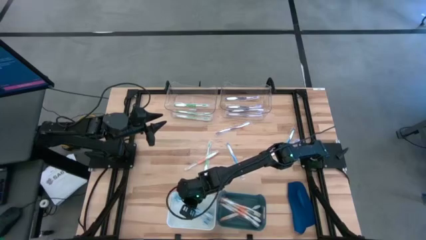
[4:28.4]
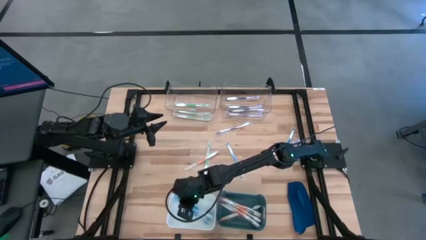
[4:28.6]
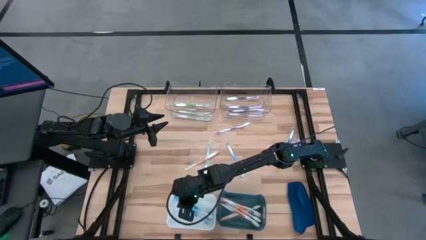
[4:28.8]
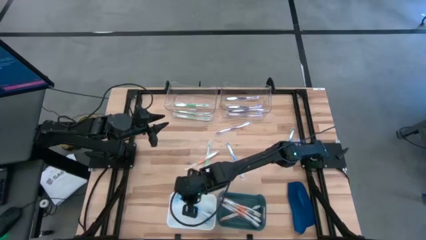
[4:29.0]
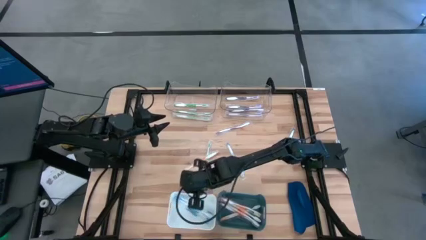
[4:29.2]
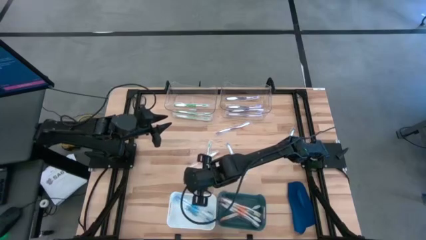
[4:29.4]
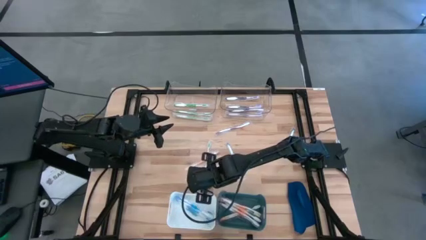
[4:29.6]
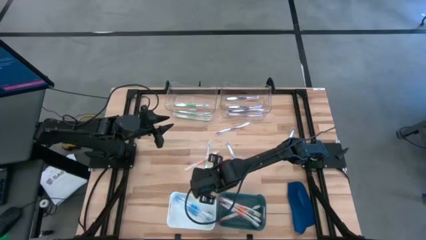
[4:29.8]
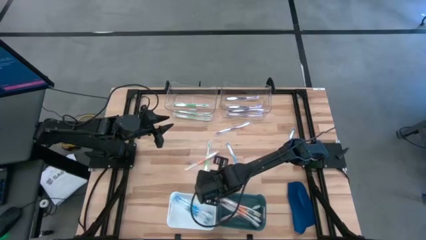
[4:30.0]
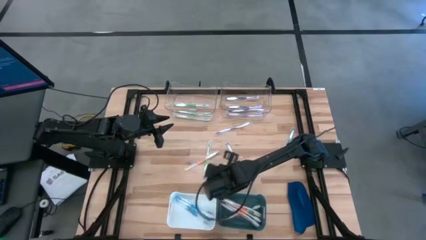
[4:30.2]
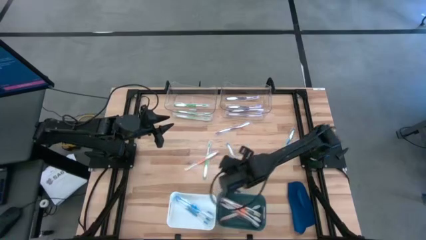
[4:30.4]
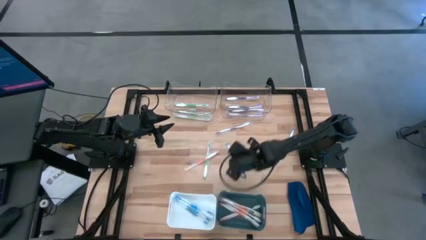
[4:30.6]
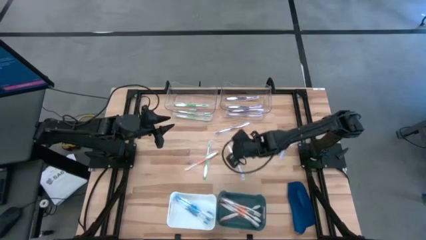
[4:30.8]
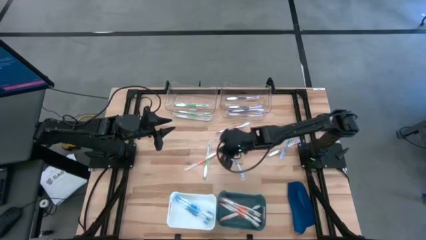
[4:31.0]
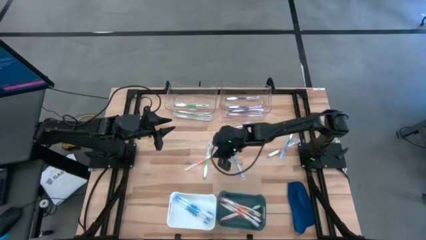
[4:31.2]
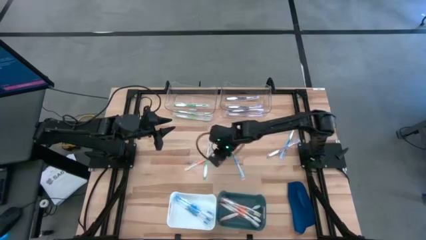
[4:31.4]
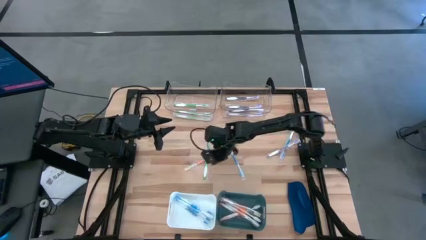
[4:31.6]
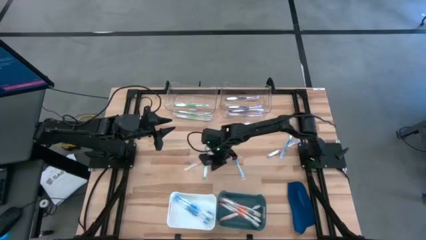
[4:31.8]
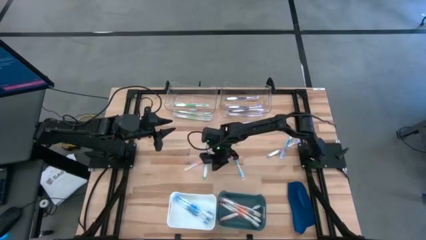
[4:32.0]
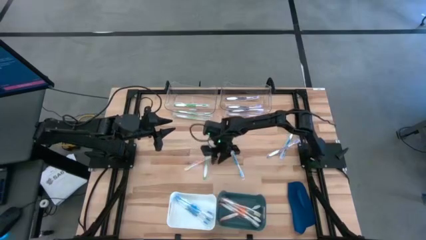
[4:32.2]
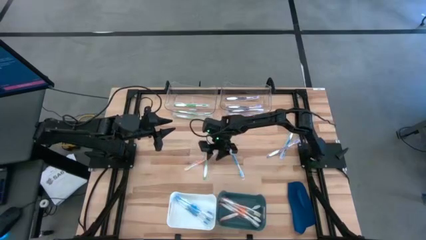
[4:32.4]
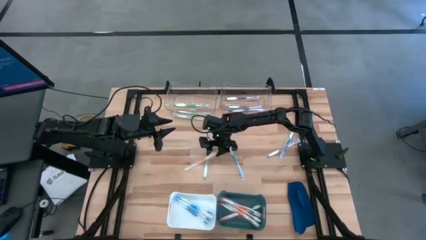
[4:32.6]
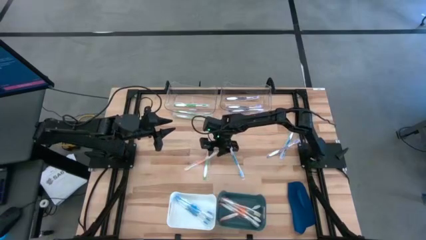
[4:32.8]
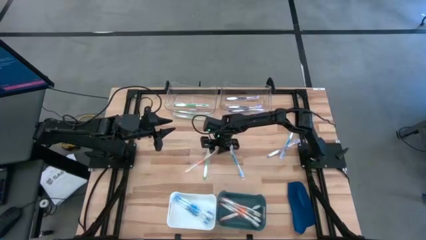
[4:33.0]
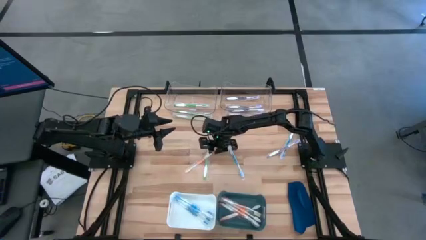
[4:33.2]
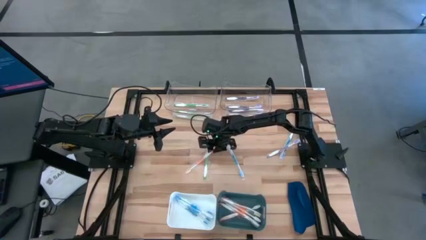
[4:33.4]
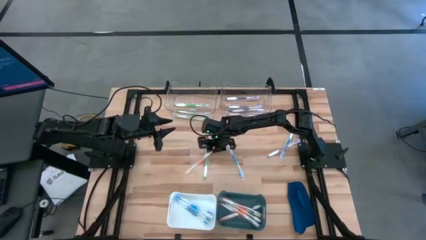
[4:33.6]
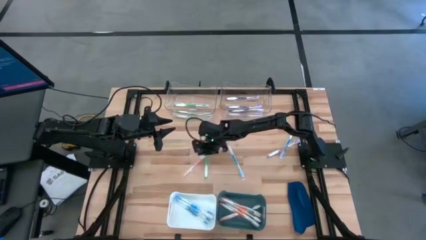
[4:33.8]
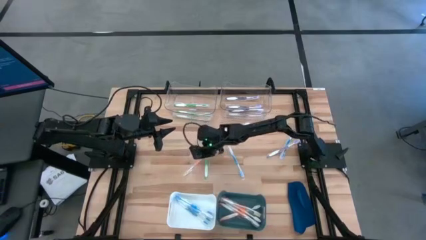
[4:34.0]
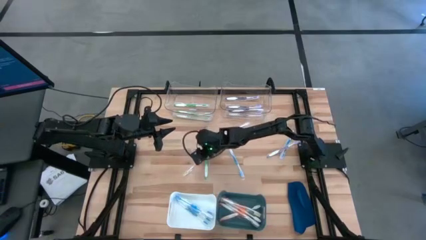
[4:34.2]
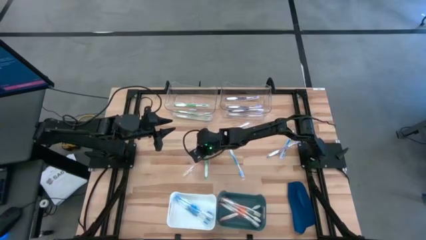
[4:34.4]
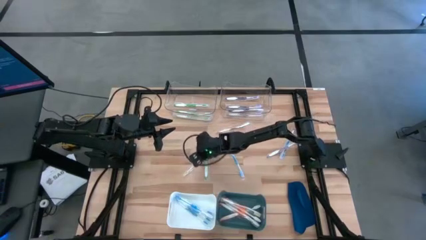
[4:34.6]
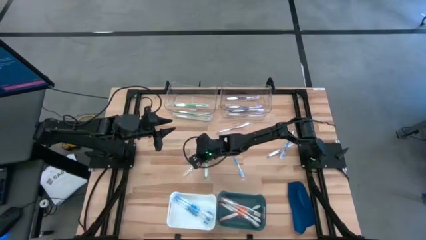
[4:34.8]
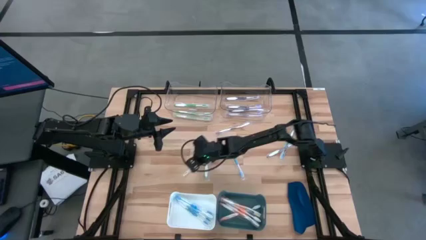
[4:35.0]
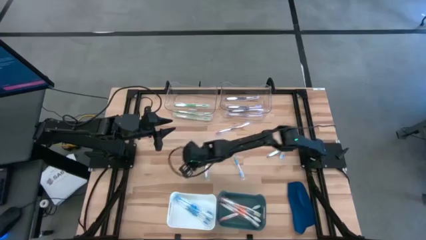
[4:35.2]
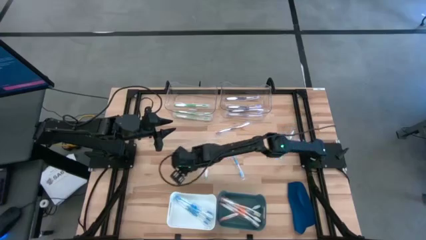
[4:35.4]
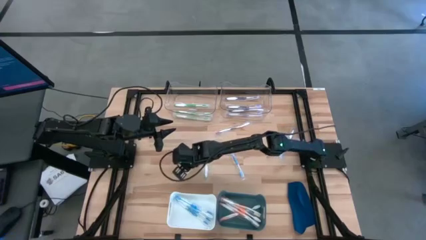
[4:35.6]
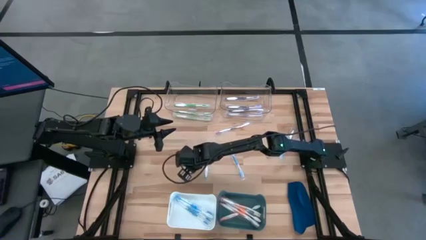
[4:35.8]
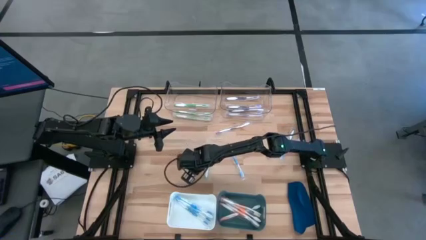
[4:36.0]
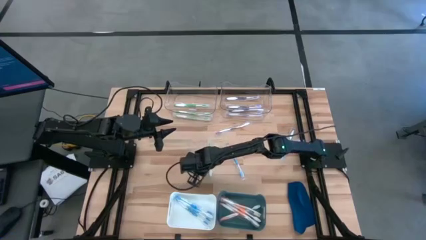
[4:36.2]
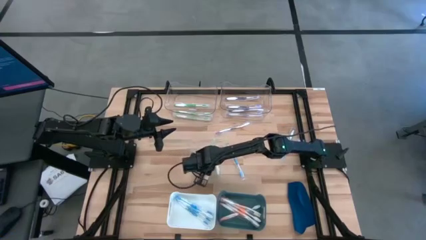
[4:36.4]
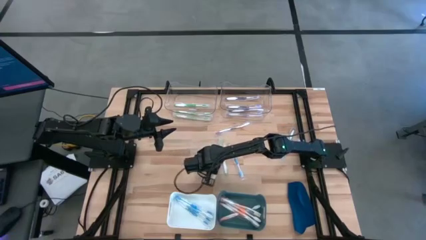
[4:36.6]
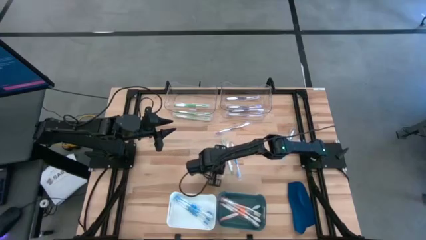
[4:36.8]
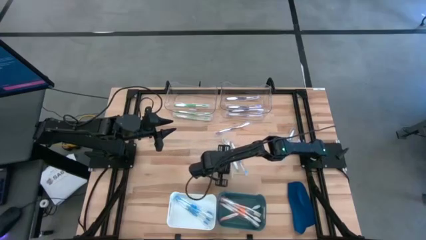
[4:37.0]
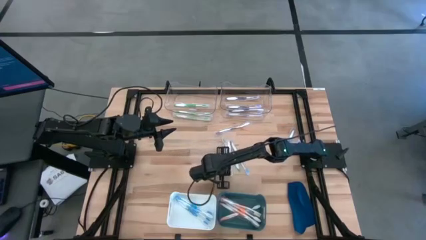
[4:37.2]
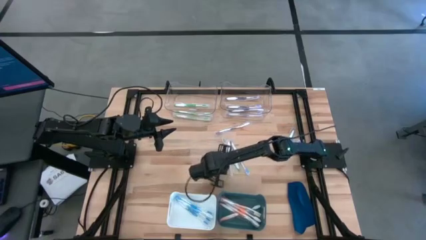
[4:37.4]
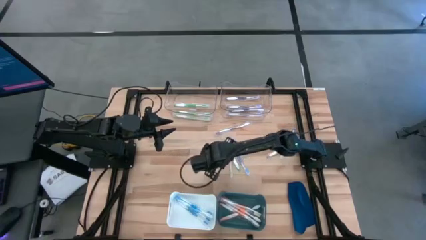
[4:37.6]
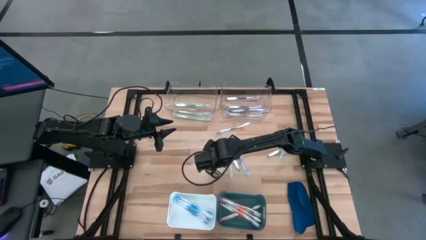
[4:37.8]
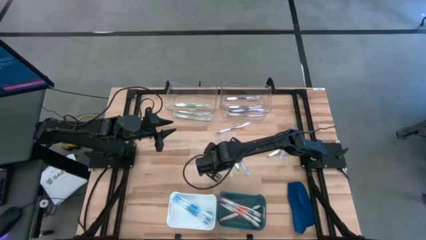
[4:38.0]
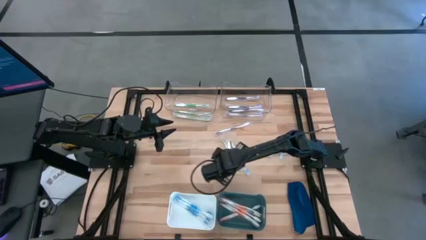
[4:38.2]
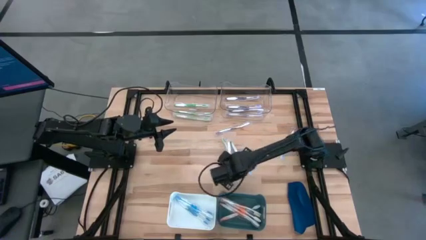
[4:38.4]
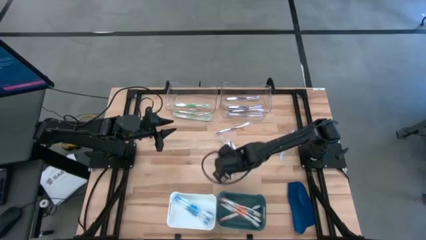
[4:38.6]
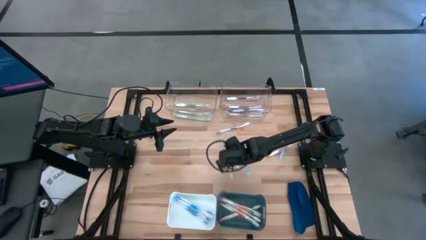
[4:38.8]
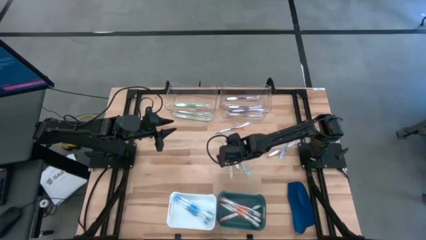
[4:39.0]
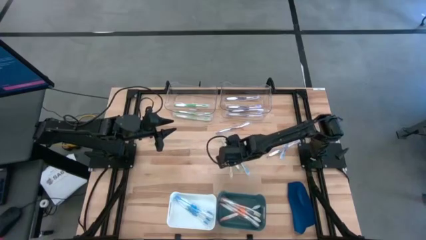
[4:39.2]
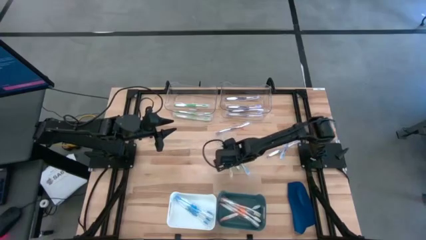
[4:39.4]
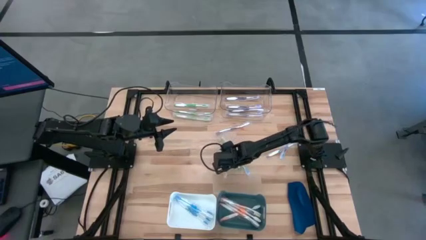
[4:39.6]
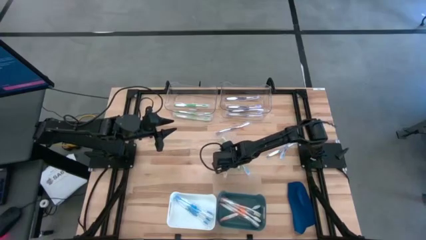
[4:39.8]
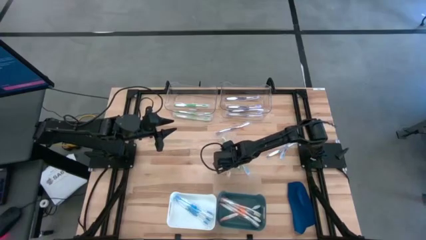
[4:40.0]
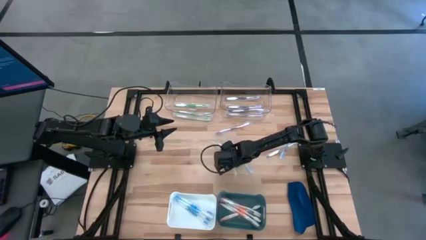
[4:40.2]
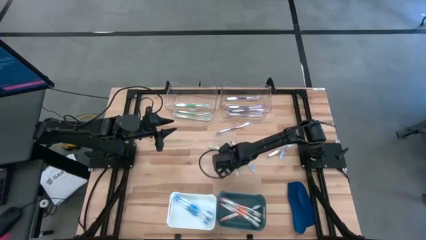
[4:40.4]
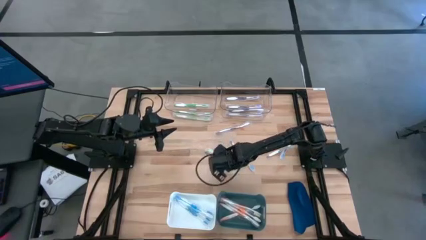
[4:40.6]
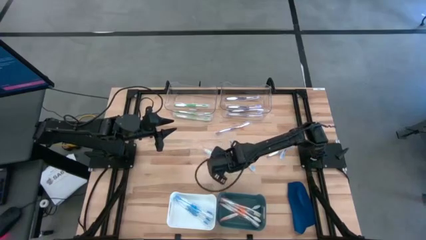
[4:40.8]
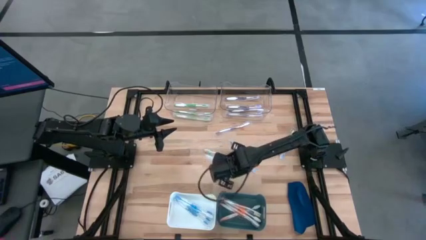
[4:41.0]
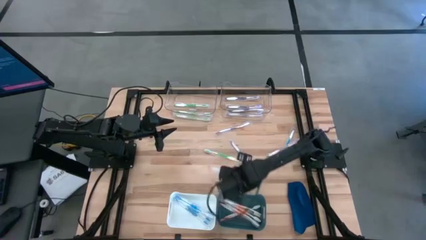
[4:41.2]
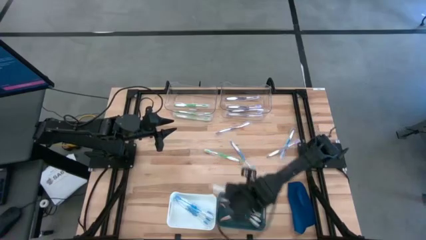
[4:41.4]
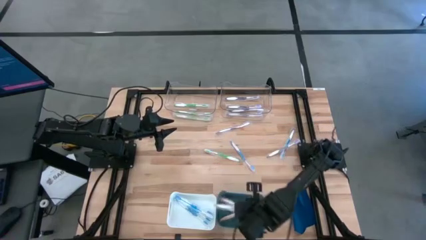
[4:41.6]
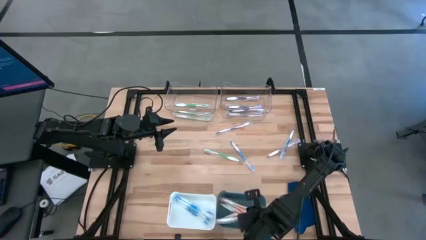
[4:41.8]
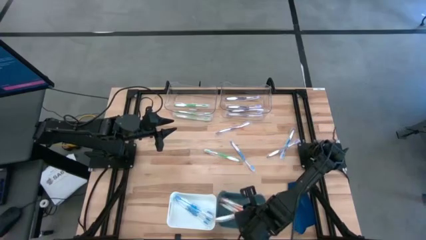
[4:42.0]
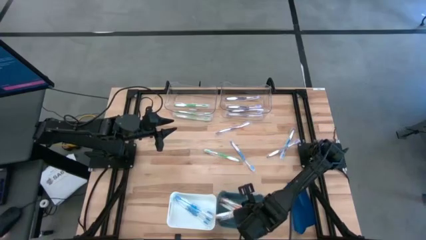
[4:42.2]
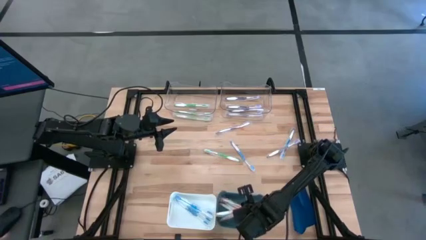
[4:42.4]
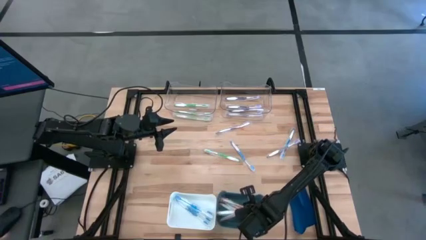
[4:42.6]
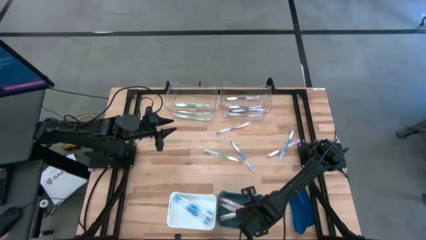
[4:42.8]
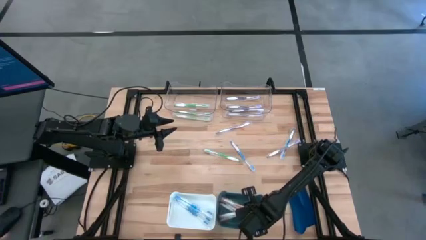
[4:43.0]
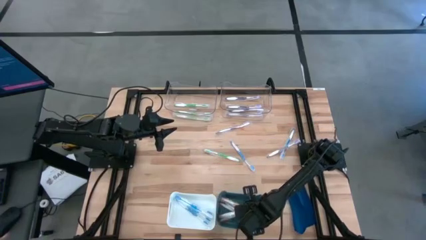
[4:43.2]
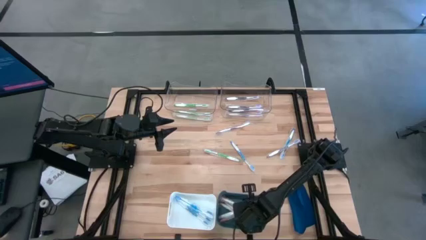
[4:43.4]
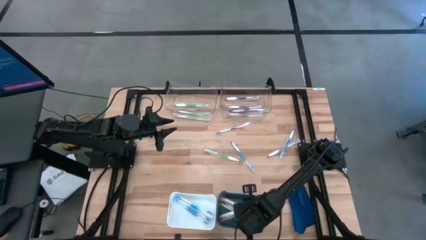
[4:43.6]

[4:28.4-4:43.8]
Task: Pick & Place Toothbrushes
Put the orange toothbrush into the green bin

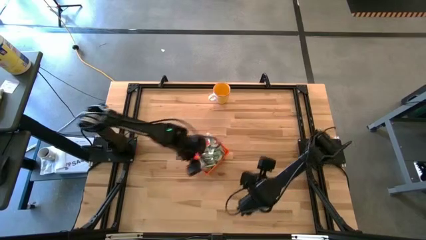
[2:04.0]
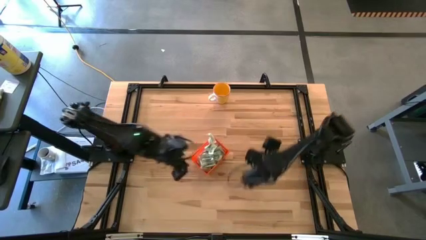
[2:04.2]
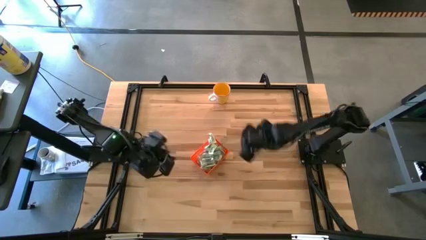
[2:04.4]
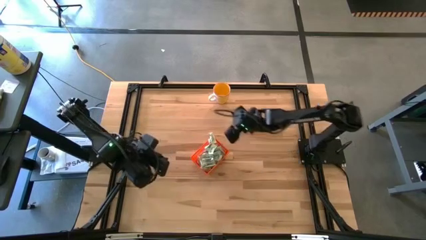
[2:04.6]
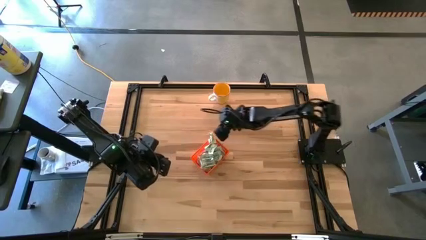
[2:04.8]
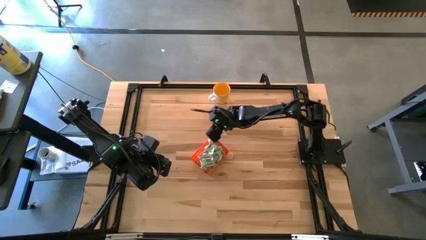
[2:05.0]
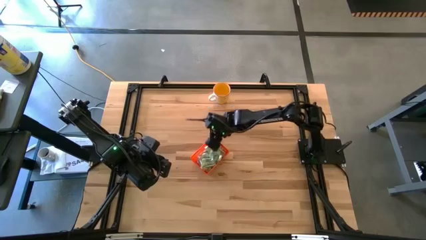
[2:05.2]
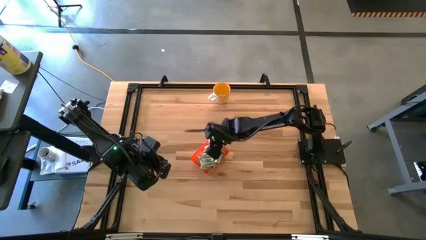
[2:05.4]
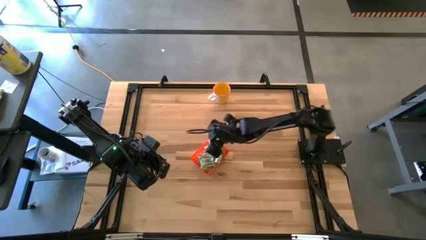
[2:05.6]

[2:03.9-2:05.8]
Task: Pick and place Stevia / Truvia into bins
Adjust the stevia packet inside the bin
